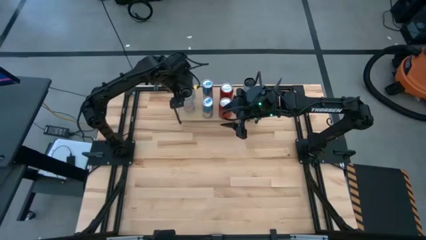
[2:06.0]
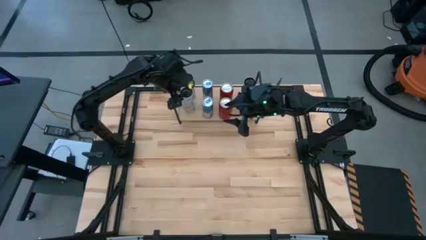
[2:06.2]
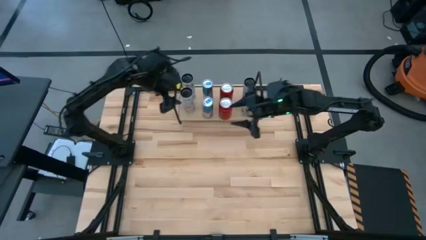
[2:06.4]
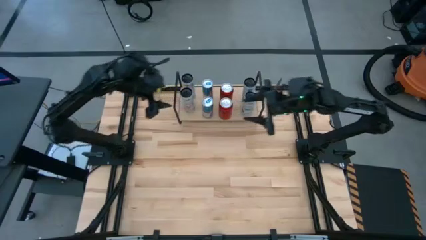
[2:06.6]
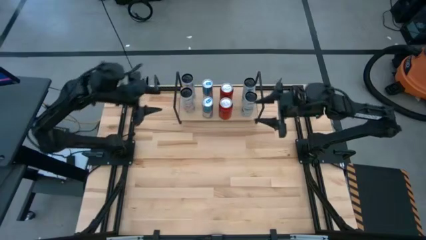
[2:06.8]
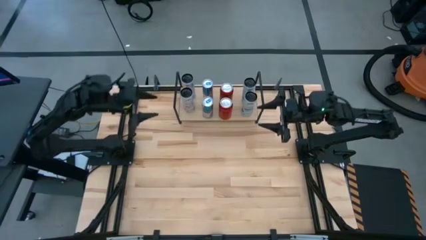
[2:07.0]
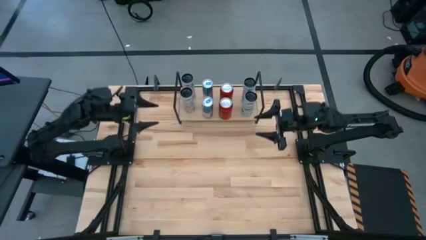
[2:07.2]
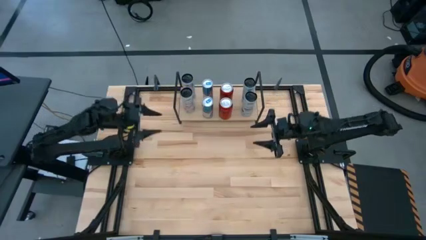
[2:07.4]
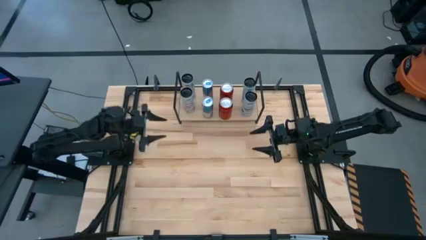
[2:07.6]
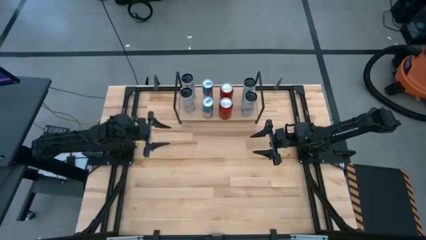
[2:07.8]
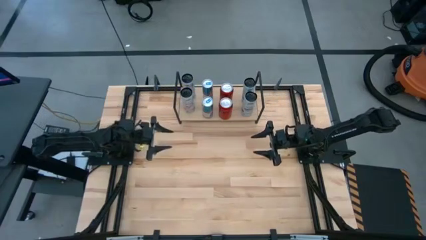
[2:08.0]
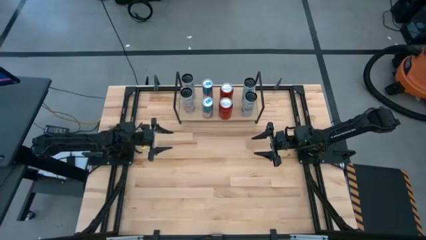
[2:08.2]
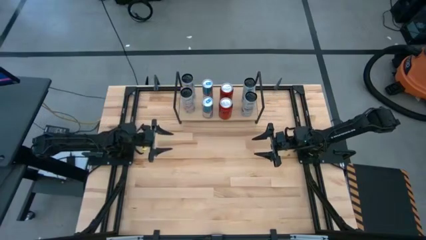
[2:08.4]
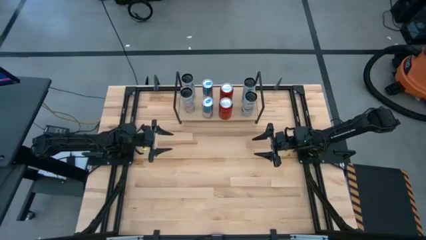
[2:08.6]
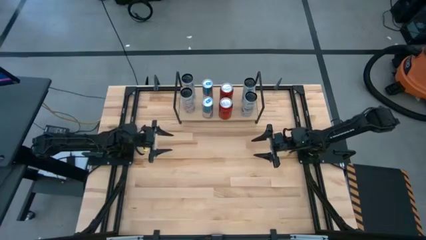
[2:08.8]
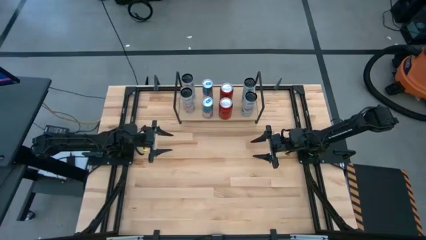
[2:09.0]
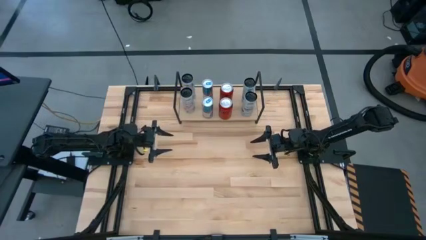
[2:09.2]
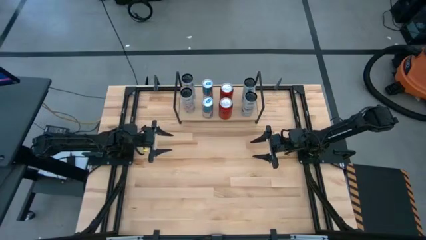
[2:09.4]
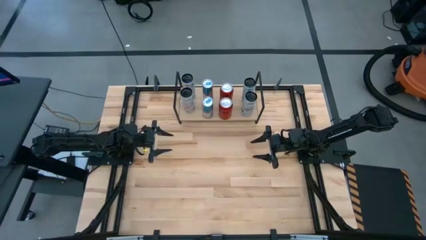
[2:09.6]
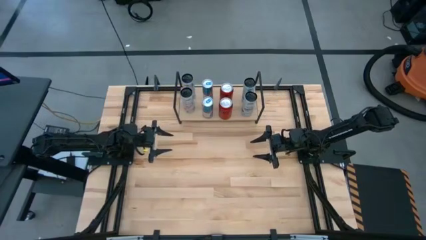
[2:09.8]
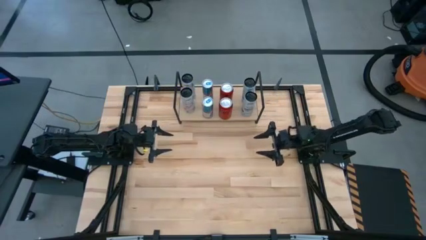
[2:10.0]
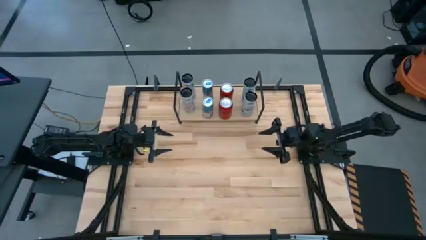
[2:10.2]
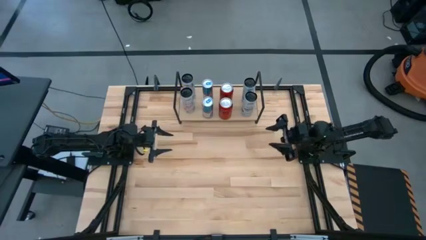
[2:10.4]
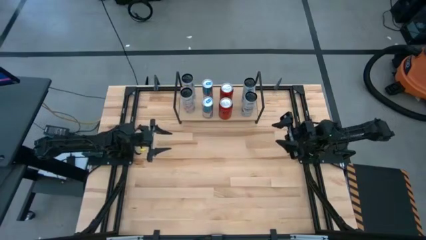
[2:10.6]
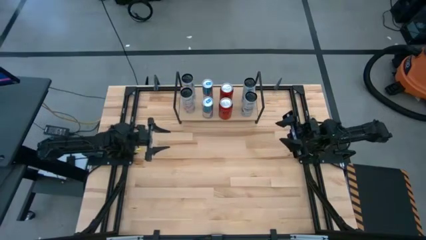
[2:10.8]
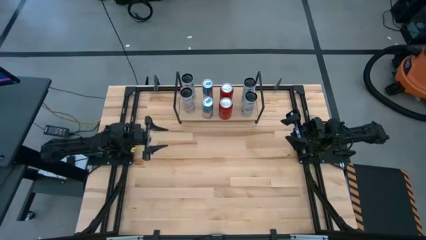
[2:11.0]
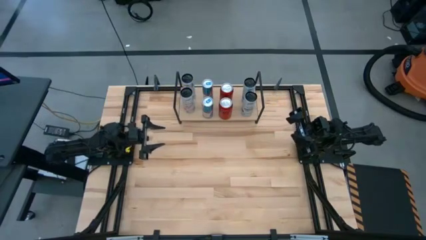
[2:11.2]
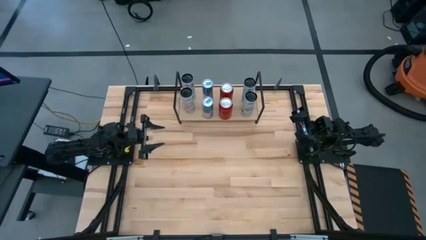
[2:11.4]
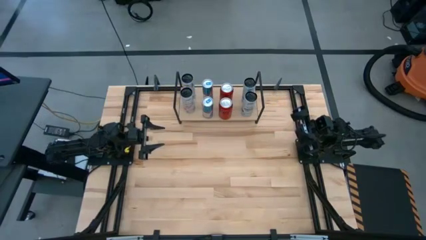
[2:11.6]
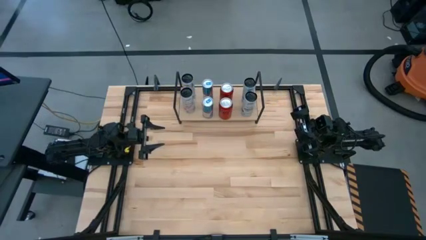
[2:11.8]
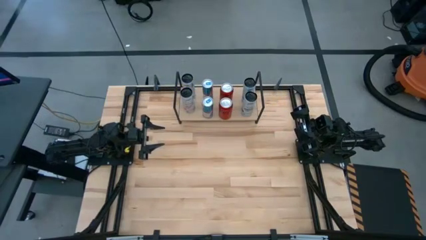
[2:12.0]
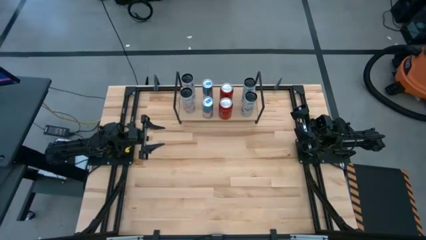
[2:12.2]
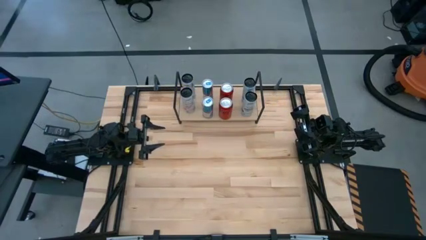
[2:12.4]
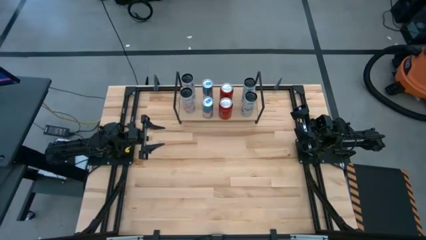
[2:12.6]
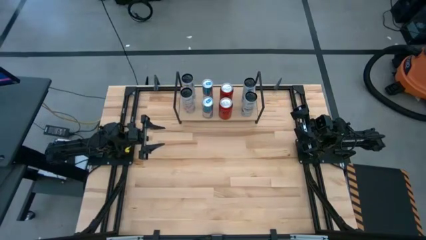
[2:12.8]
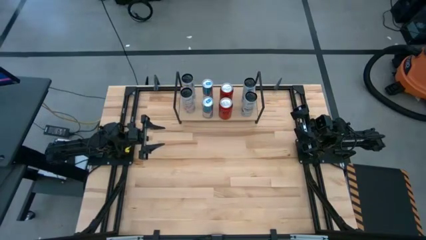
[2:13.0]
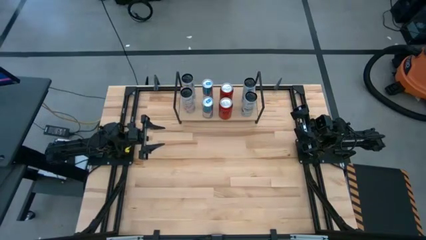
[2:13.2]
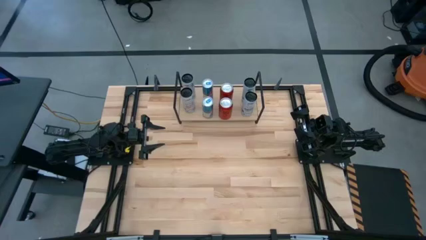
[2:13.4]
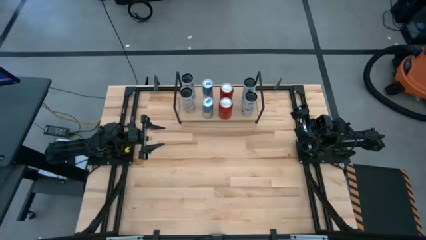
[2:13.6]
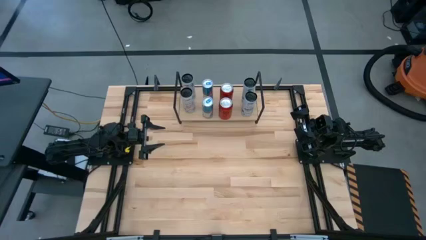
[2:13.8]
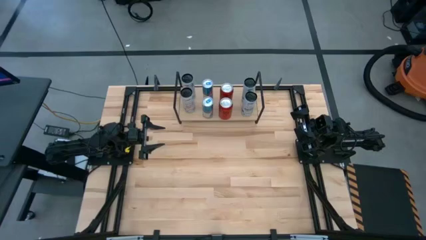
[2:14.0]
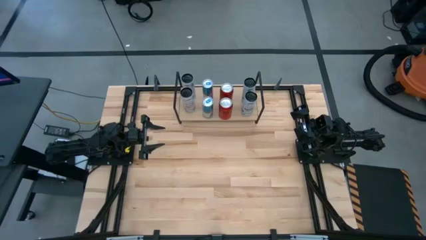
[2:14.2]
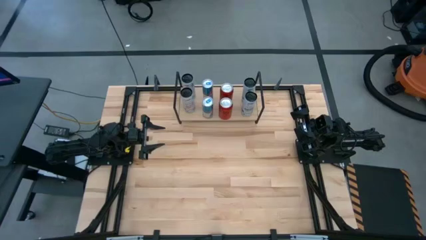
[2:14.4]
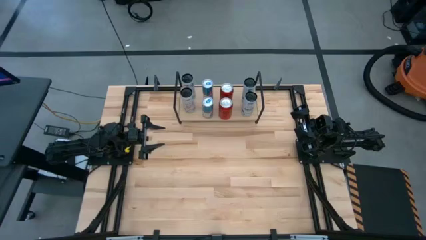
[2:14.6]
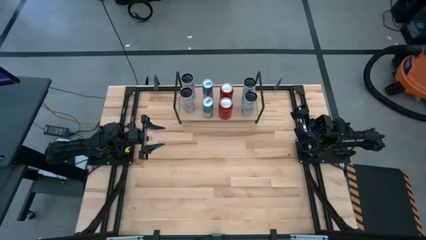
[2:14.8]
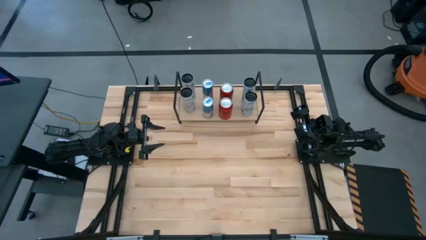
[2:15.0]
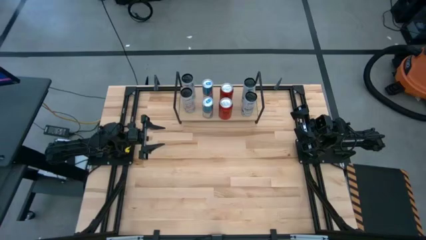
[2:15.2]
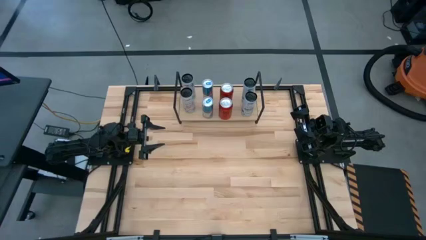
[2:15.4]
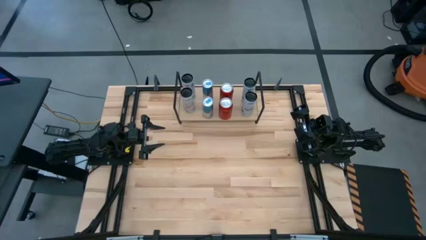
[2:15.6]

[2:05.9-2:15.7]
Task: Place canned beverage on shelf
Return to Home Position

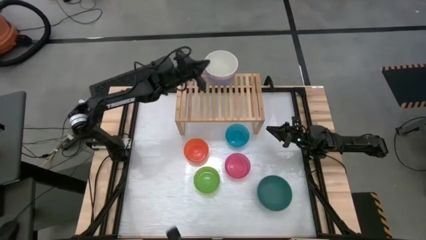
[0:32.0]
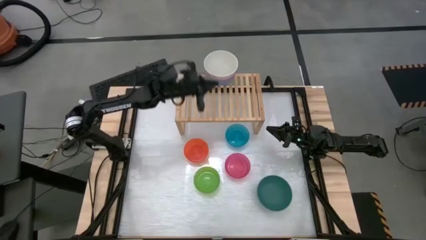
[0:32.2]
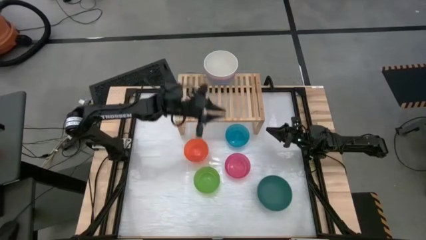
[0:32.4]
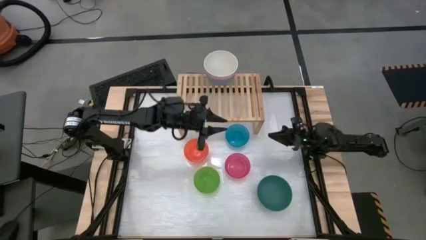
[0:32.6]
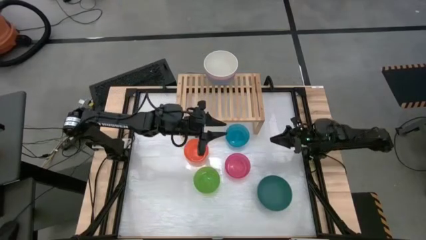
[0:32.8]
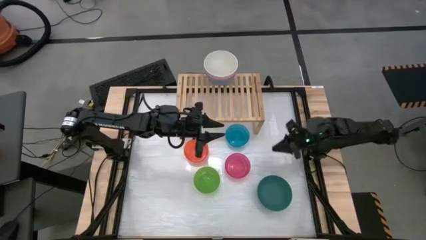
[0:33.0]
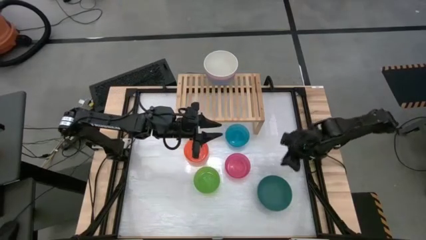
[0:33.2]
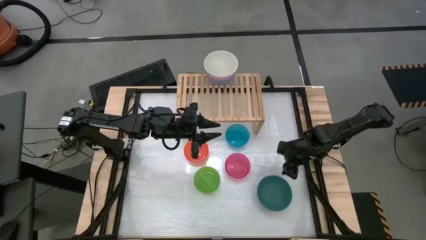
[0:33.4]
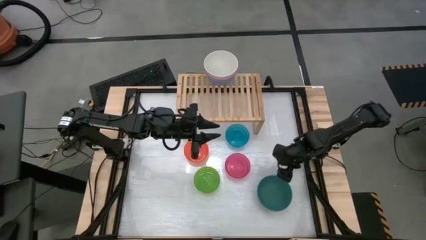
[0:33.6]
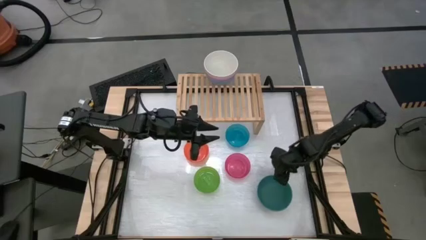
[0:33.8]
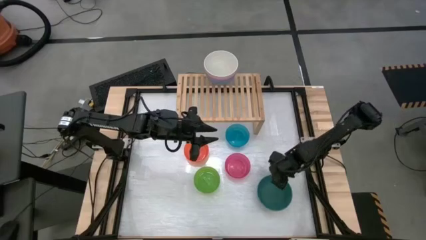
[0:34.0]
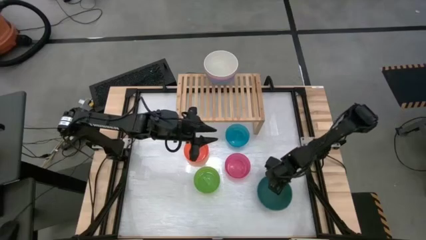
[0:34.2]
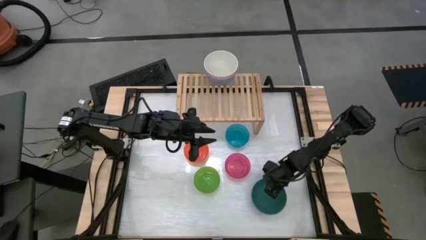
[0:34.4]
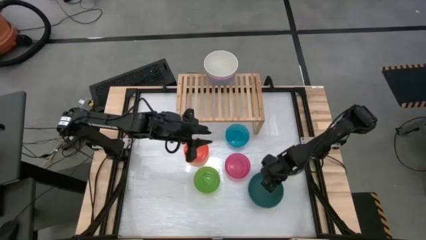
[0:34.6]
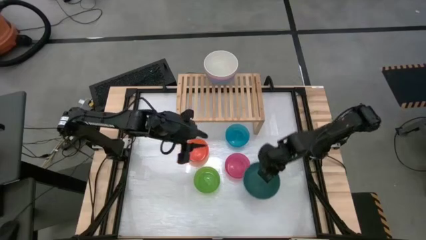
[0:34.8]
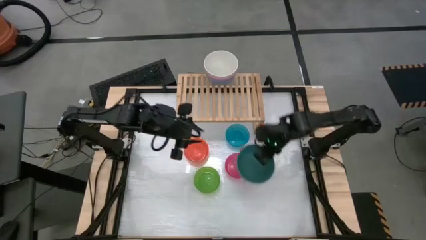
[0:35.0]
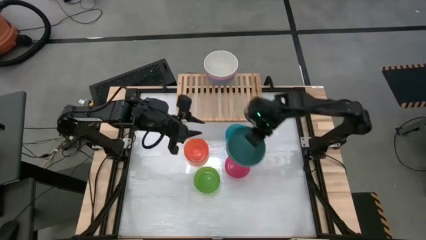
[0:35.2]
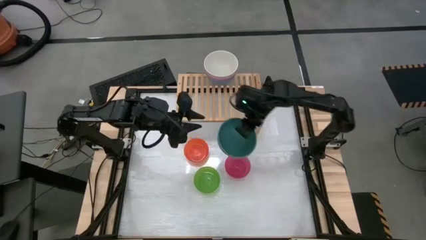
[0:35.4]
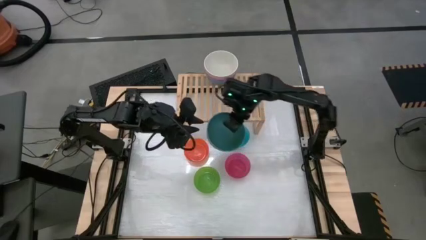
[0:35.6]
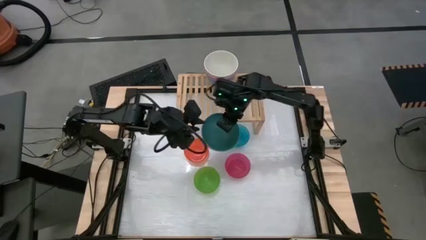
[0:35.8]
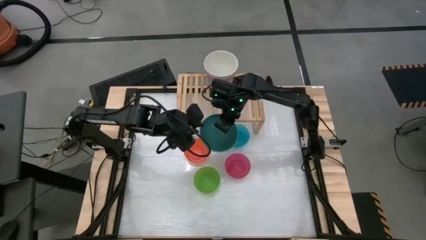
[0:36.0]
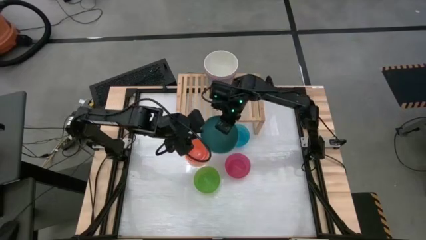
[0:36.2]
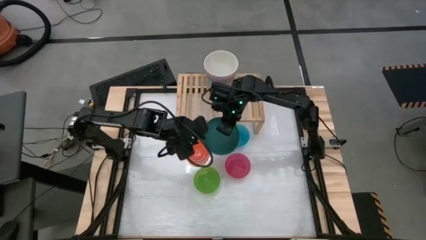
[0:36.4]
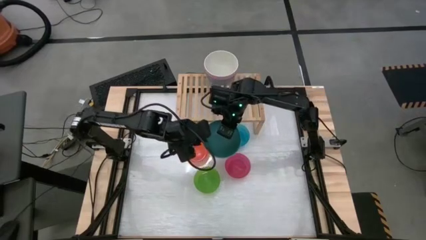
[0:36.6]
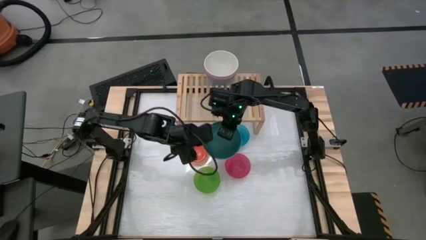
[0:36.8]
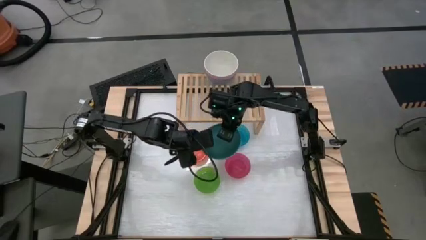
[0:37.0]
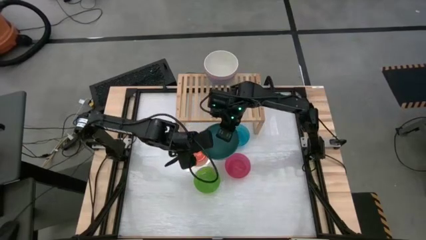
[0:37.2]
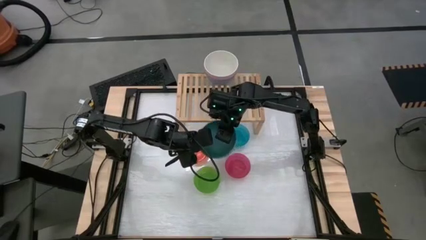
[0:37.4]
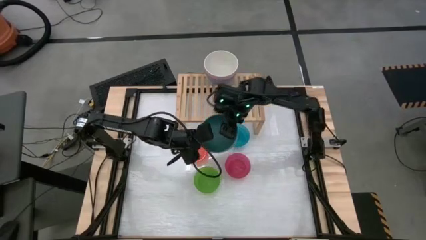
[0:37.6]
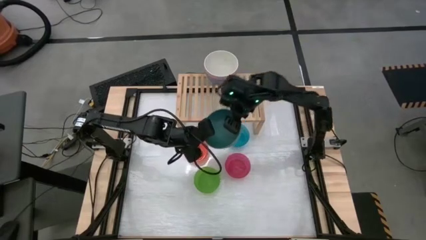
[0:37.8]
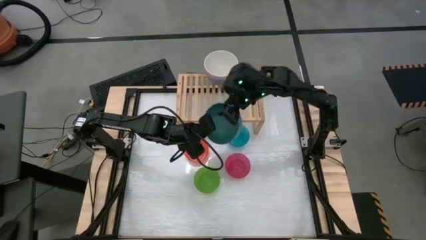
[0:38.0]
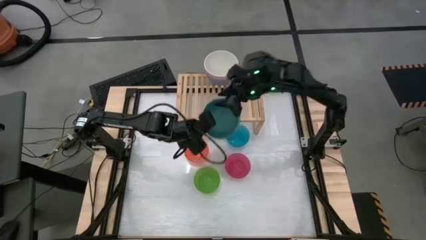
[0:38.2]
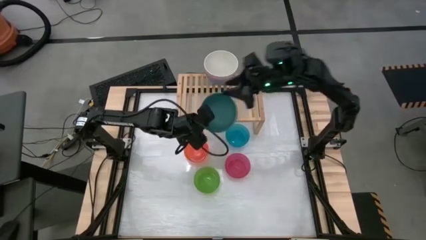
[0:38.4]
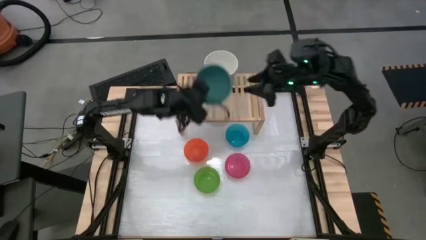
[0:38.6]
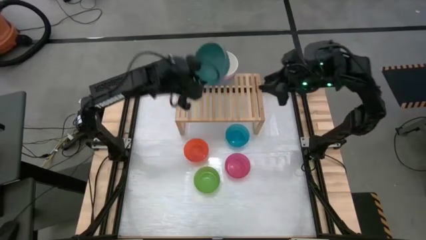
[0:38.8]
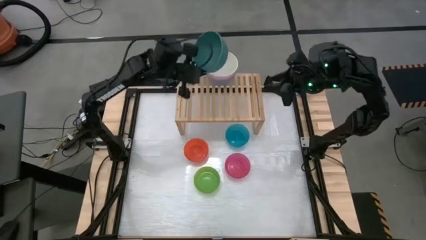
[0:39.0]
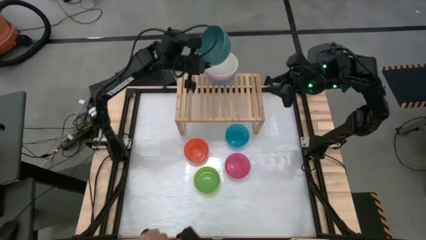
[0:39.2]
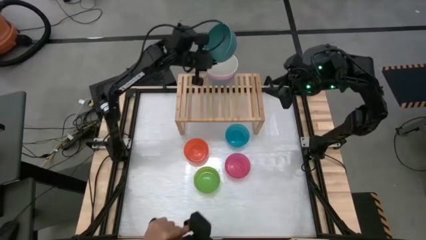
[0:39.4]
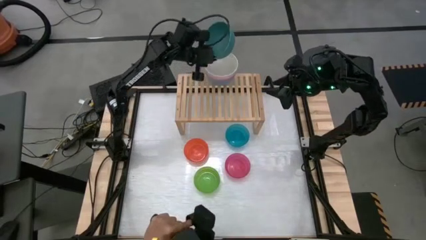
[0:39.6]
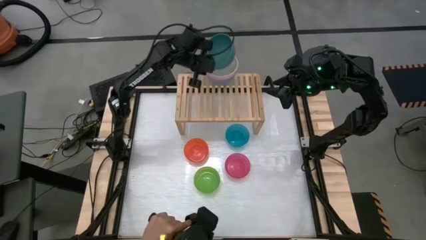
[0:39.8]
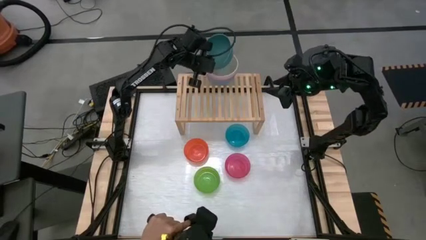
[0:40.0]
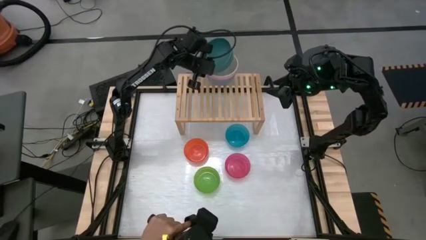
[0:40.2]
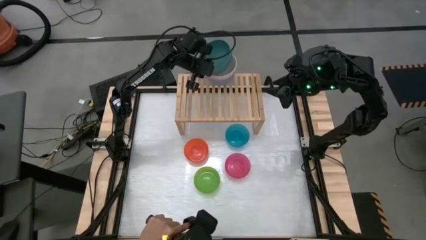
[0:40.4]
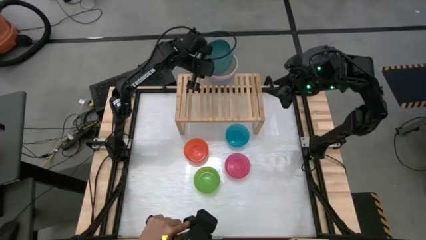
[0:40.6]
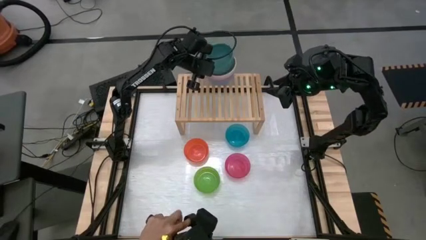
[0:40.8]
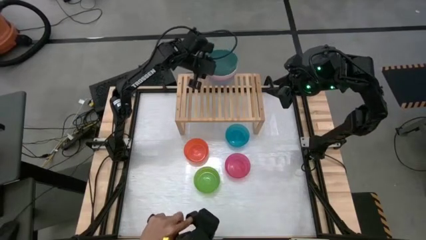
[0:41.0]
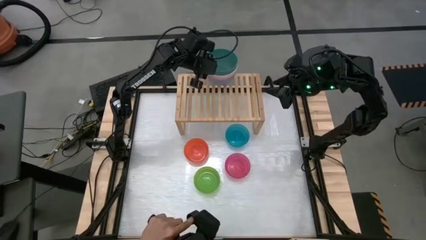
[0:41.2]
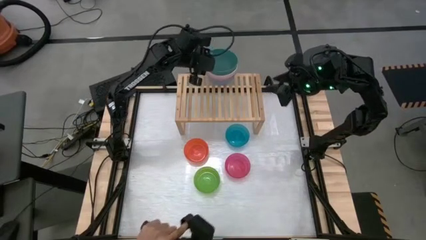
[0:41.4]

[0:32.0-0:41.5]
Task: Place and stack bowls onto a shelf
Stack the right green bowl on top of the white bowl on the shelf
